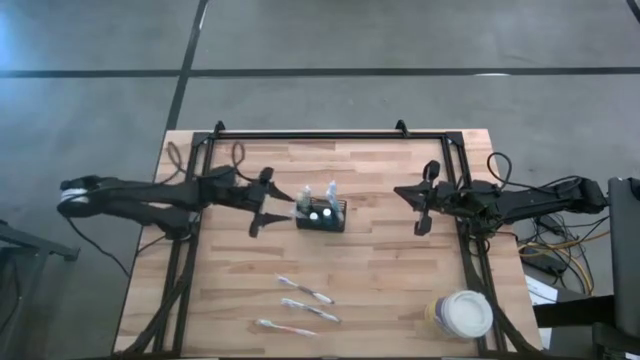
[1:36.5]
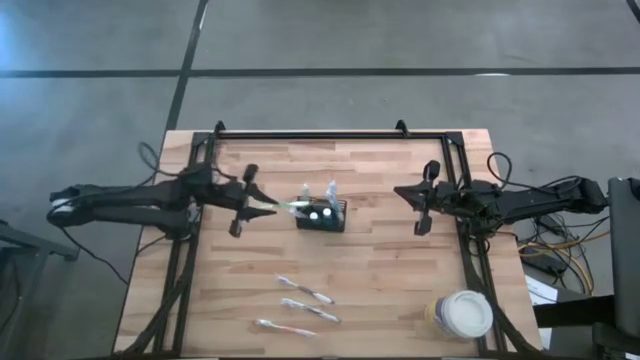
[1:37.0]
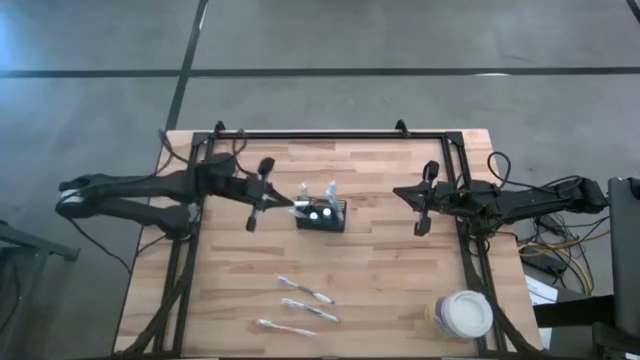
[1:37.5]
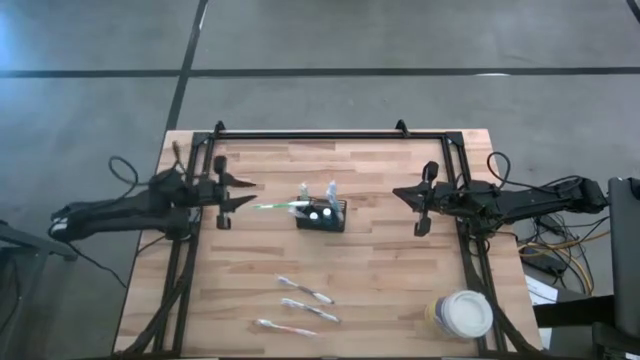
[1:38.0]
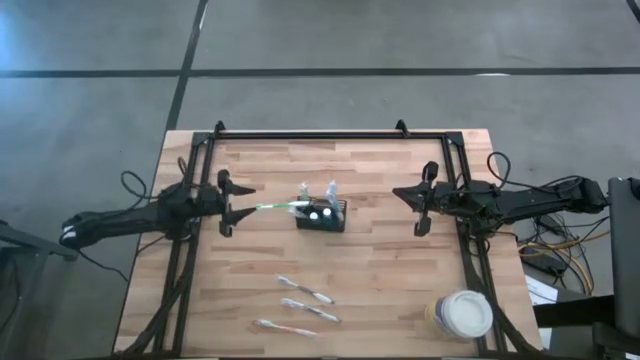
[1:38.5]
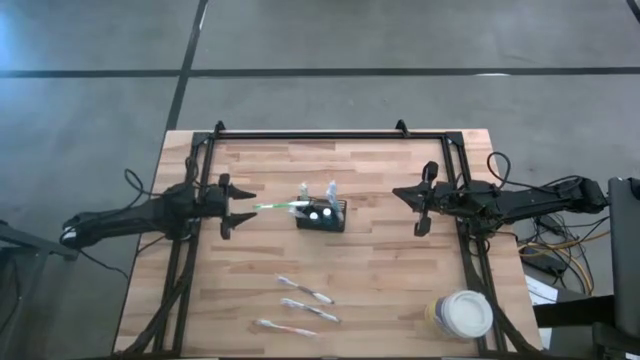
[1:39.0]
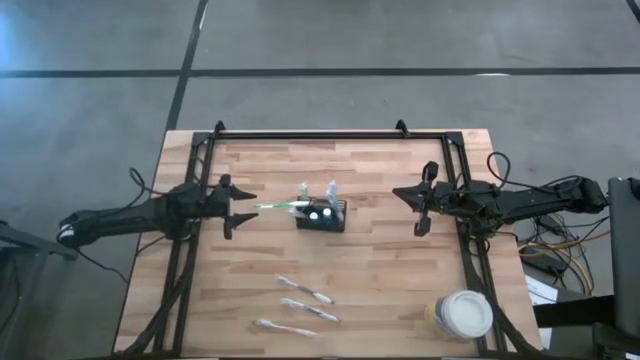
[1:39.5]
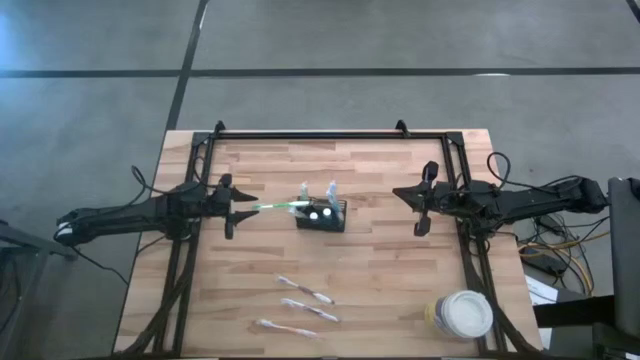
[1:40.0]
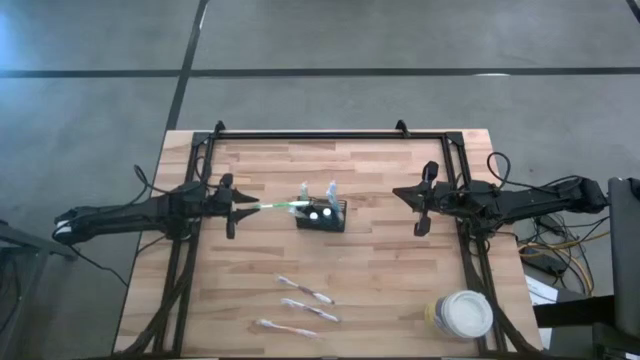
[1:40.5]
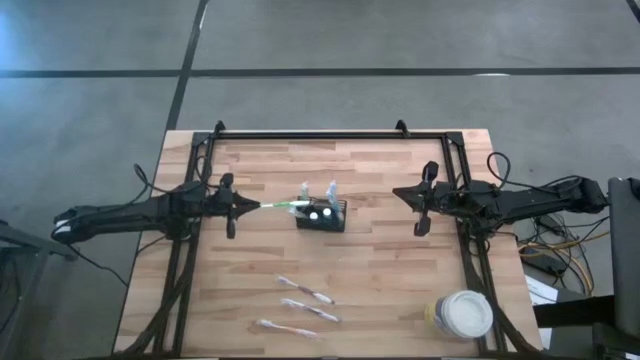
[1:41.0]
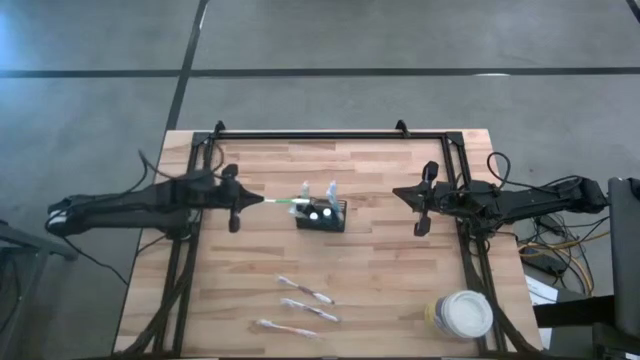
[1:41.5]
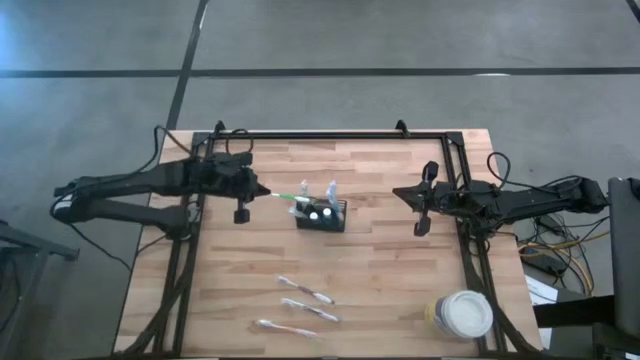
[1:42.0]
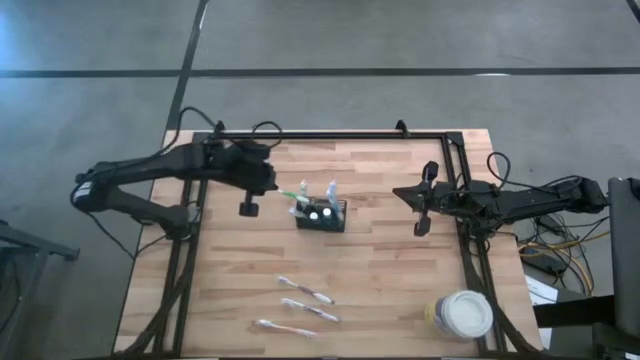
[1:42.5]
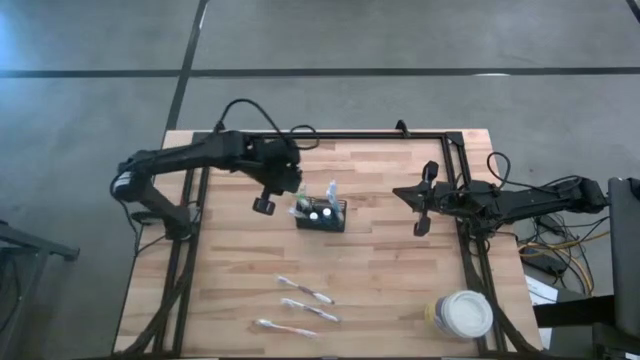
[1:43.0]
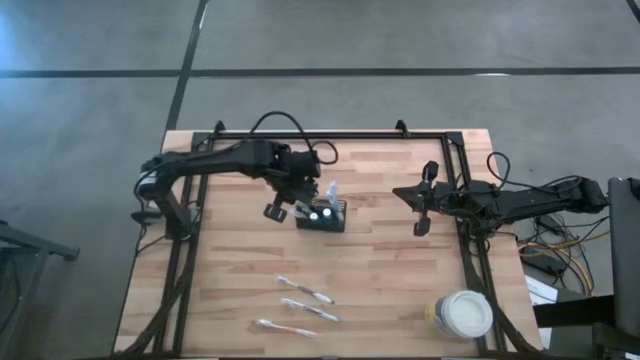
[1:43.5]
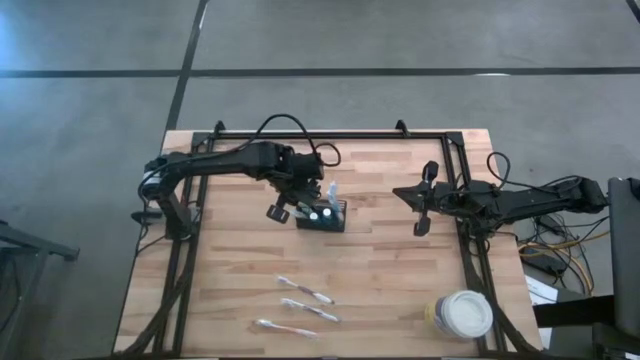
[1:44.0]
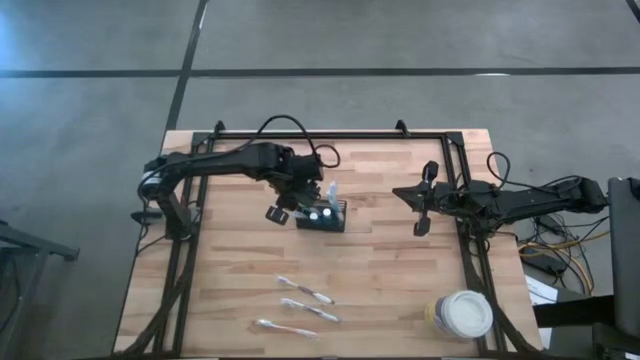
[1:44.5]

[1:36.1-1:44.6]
Task: Pick & Place toothbrushing station
Adjust the green toothbrush in the wire organizer

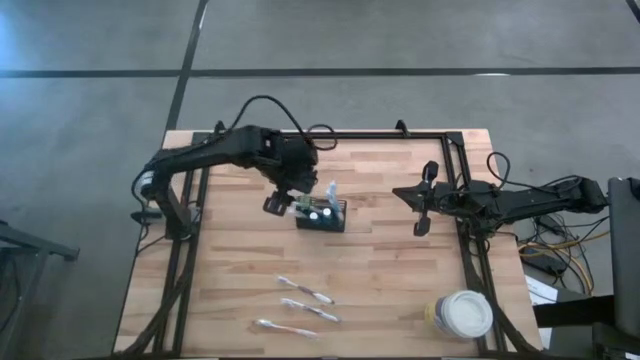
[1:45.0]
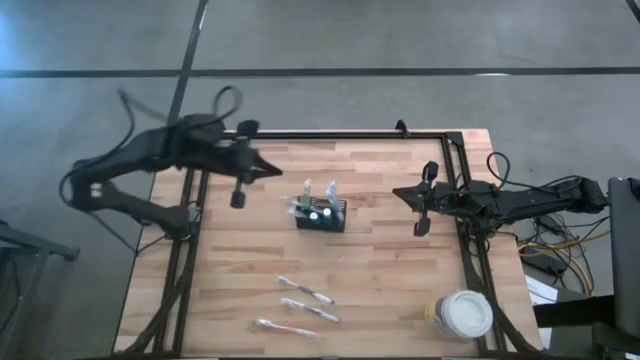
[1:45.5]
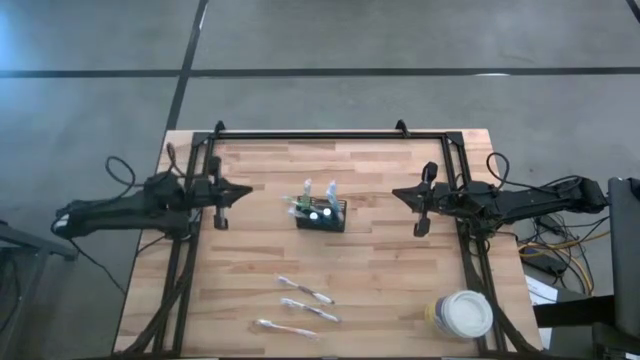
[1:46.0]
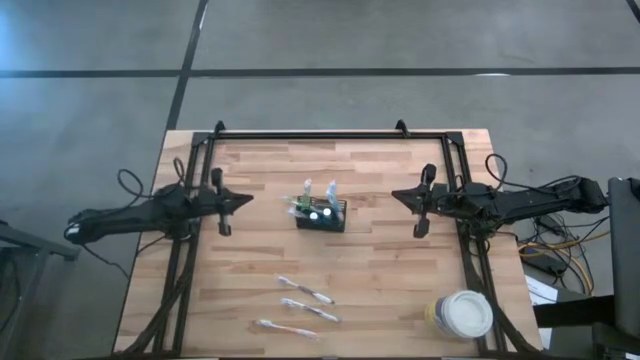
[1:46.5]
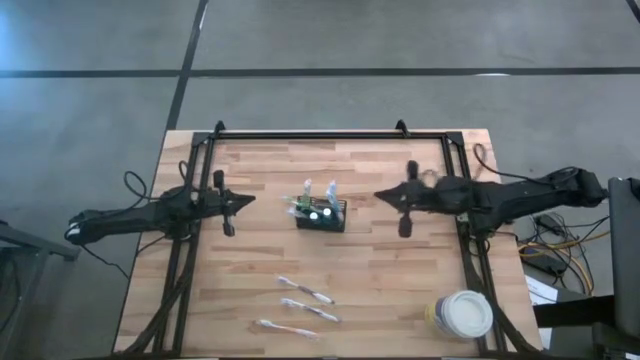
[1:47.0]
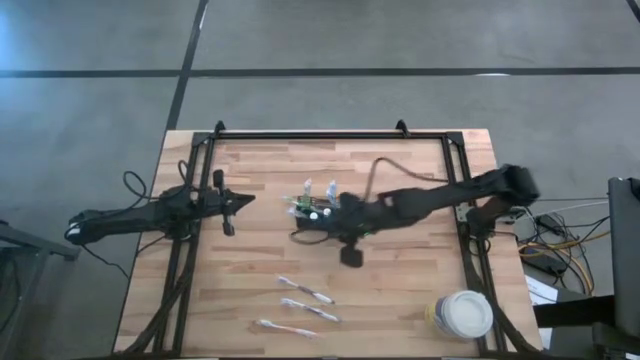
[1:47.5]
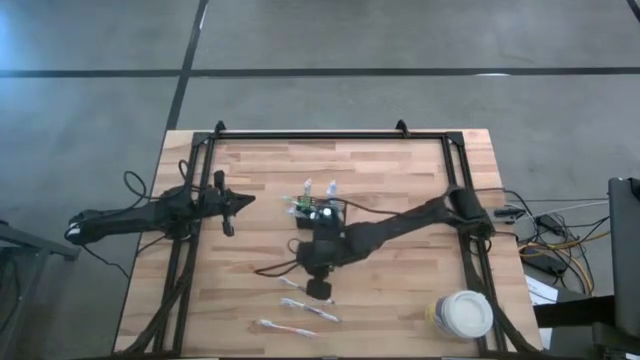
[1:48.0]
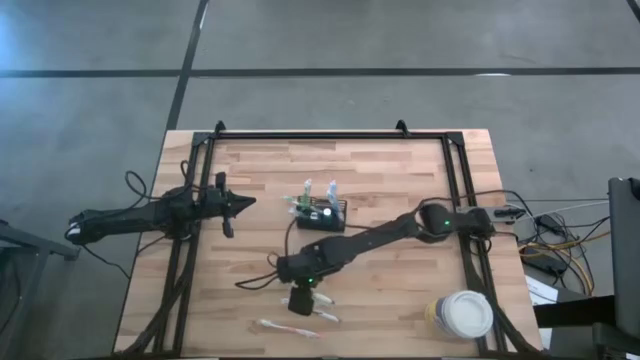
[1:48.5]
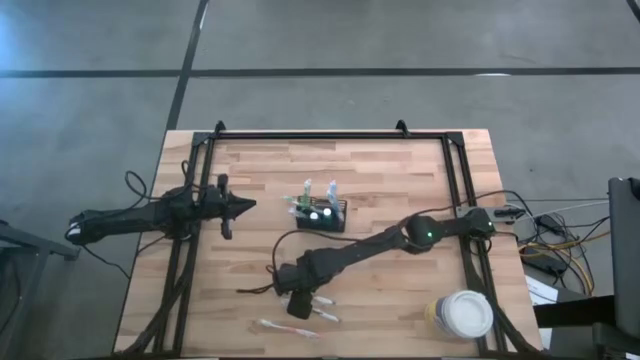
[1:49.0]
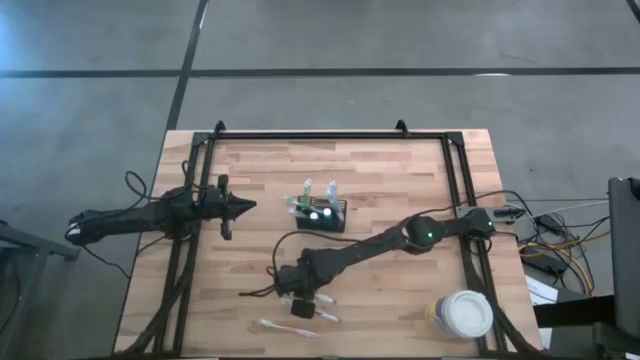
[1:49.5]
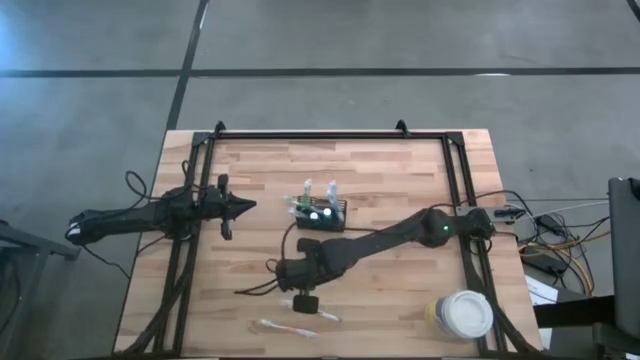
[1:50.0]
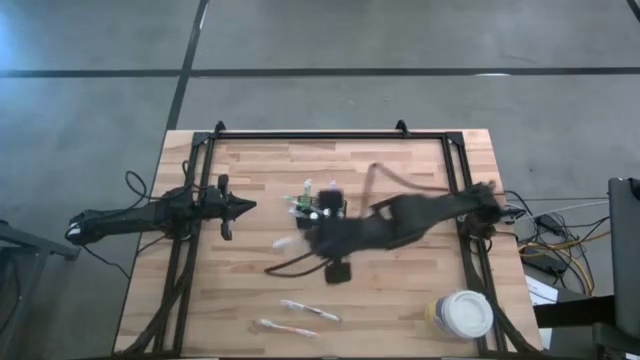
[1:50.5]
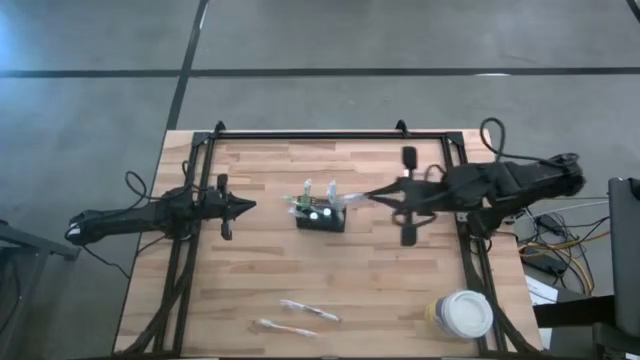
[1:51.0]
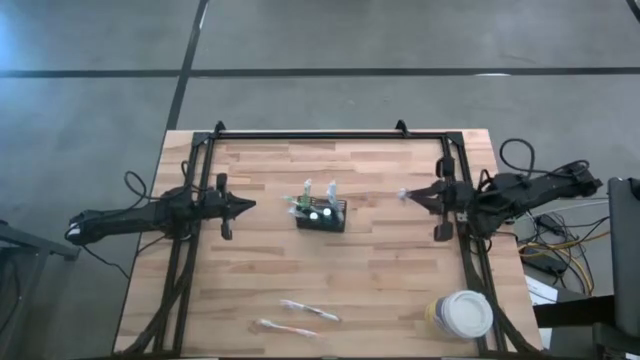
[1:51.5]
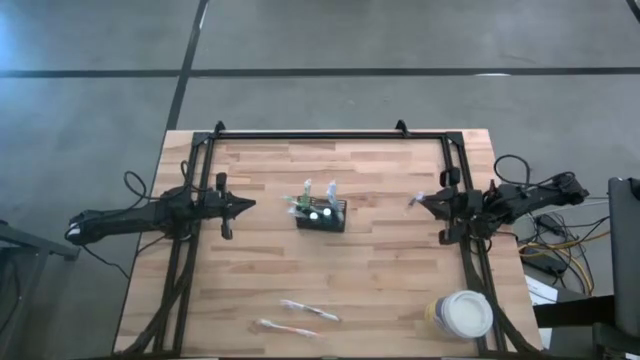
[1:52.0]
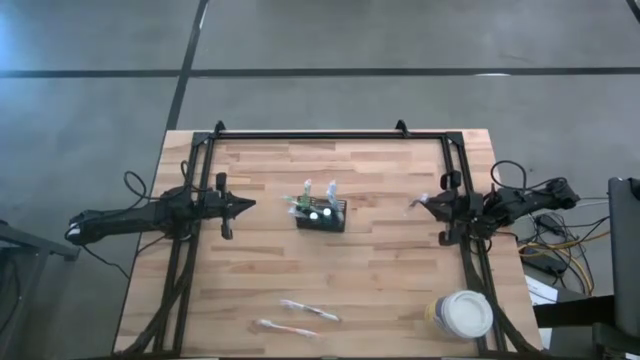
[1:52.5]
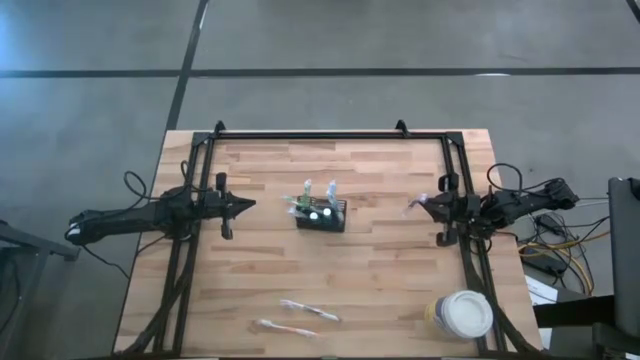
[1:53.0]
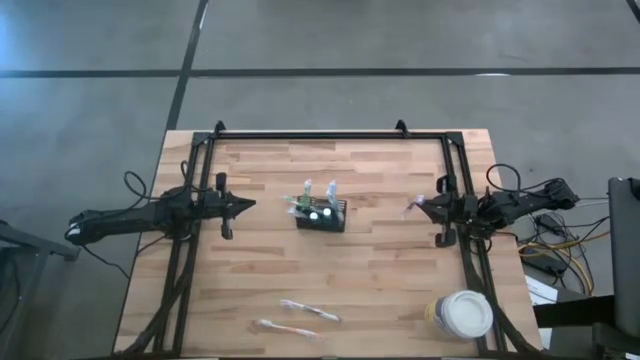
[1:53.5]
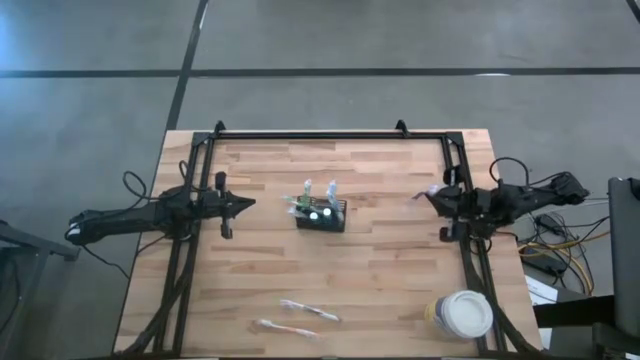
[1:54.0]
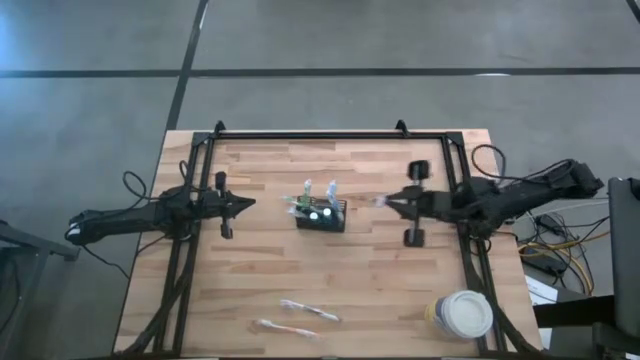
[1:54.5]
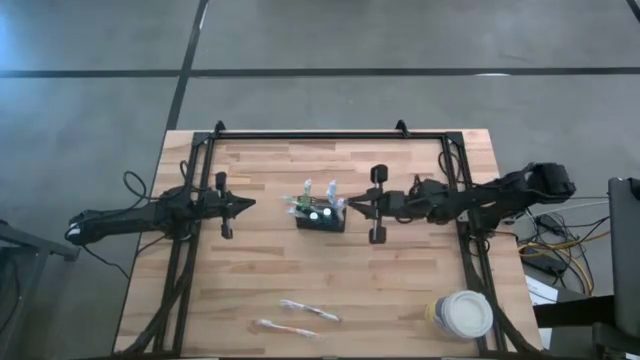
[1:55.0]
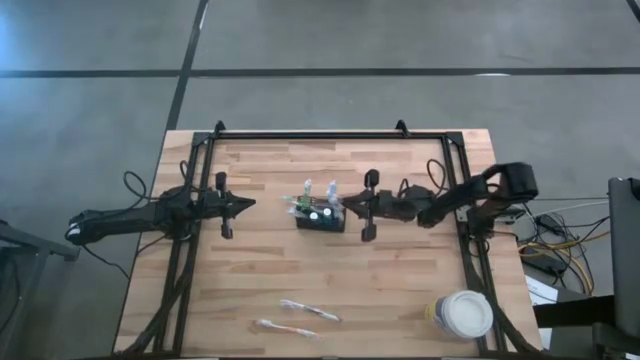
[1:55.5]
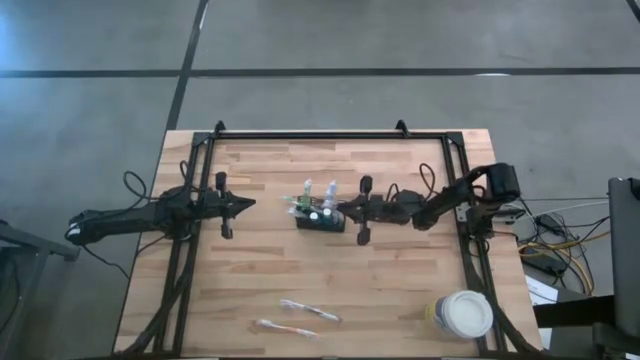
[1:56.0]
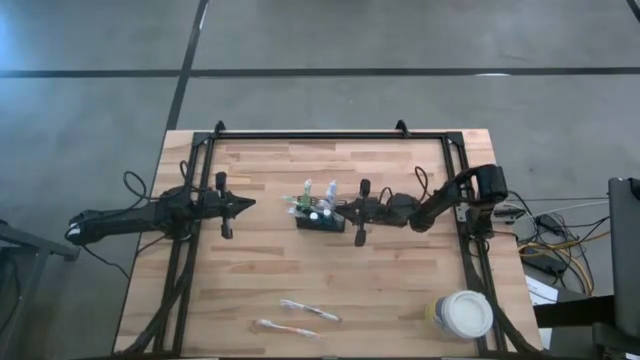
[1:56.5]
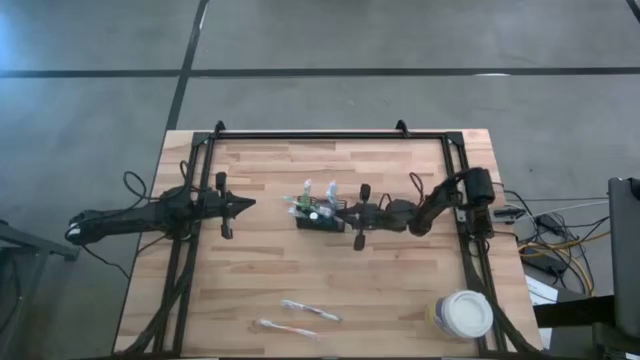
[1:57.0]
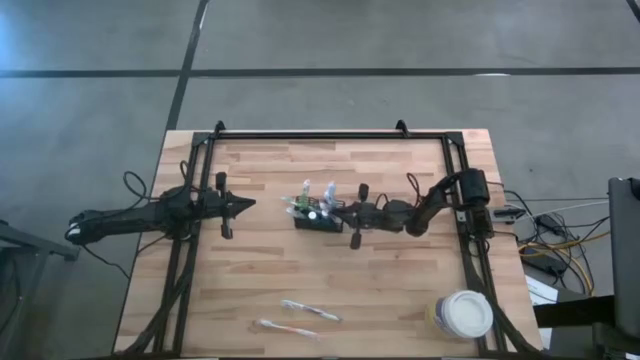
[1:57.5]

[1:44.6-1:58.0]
Put the top purple toothbrush into the wire organizer
